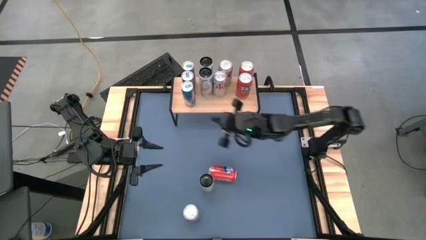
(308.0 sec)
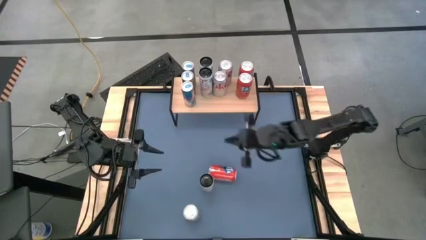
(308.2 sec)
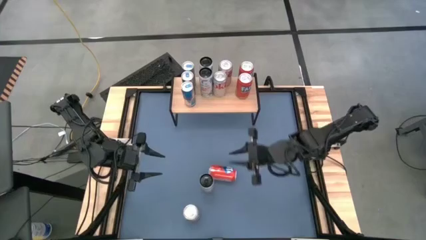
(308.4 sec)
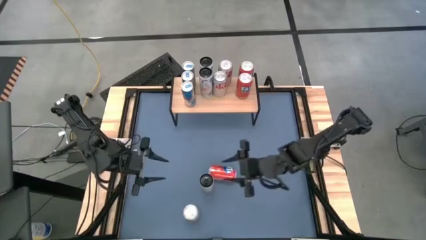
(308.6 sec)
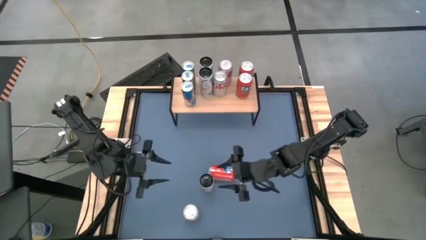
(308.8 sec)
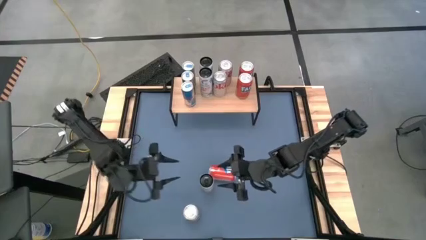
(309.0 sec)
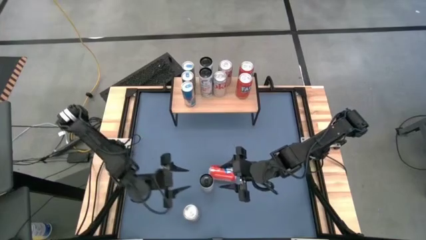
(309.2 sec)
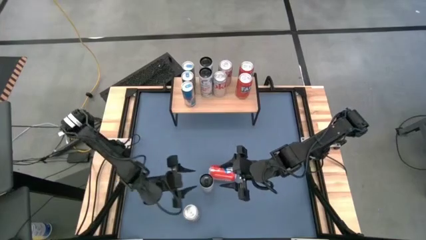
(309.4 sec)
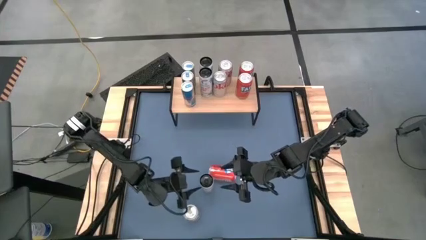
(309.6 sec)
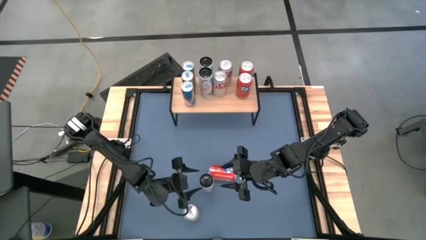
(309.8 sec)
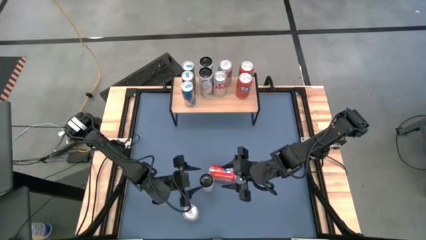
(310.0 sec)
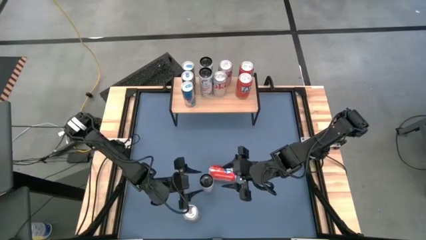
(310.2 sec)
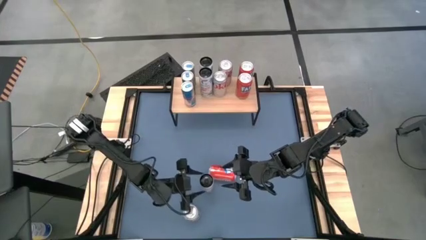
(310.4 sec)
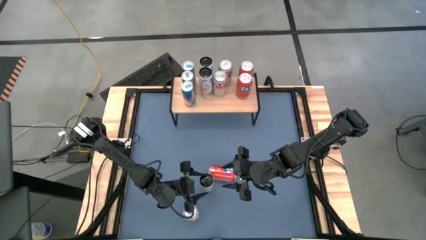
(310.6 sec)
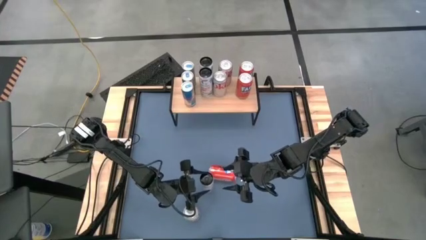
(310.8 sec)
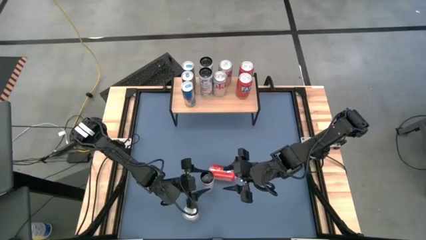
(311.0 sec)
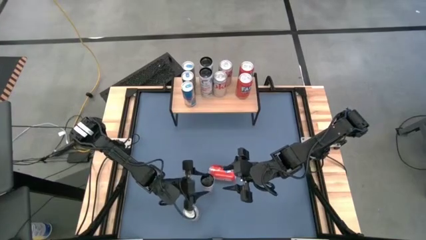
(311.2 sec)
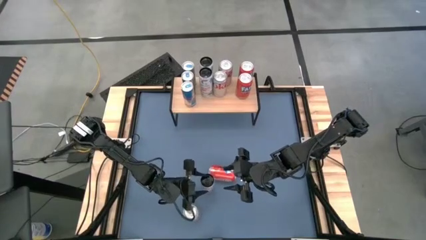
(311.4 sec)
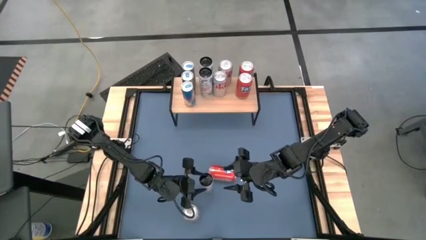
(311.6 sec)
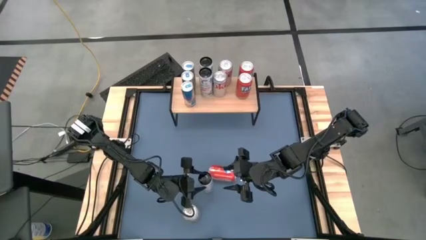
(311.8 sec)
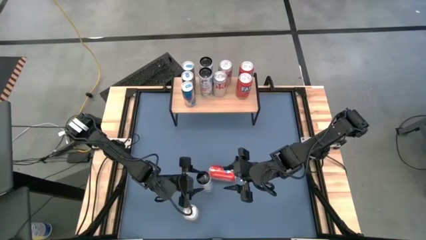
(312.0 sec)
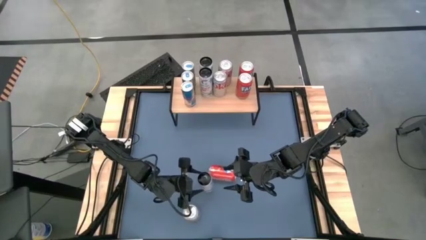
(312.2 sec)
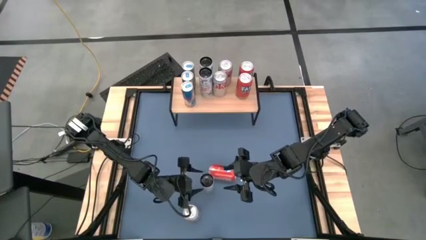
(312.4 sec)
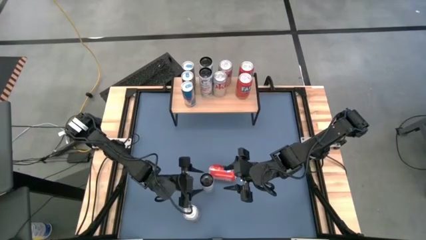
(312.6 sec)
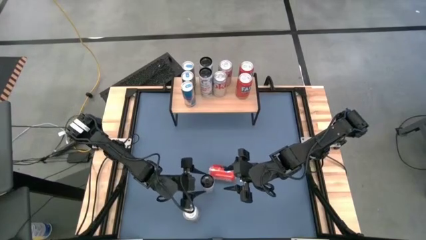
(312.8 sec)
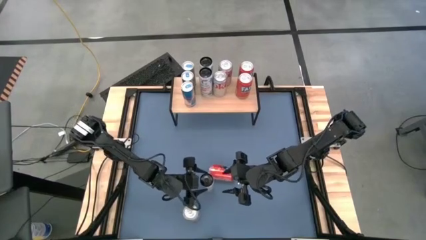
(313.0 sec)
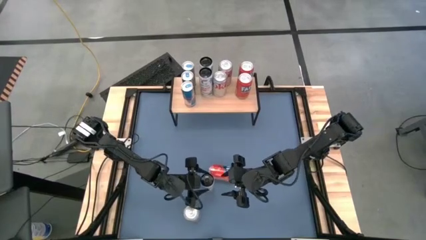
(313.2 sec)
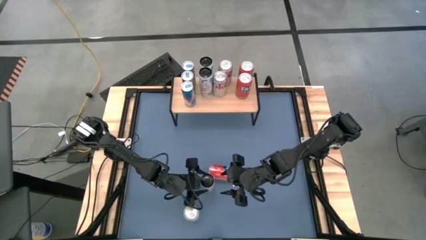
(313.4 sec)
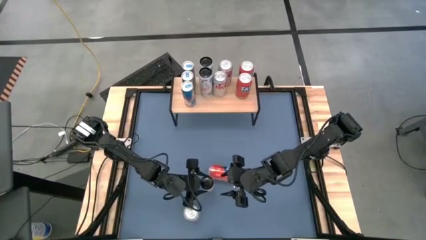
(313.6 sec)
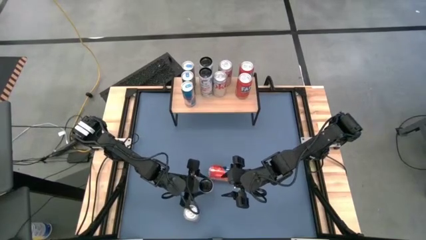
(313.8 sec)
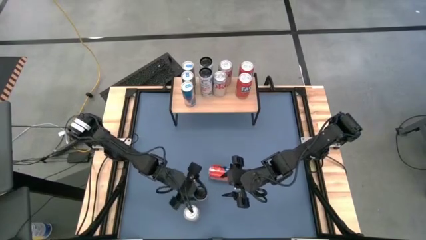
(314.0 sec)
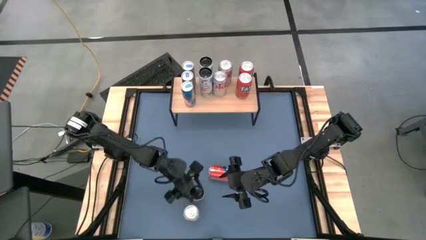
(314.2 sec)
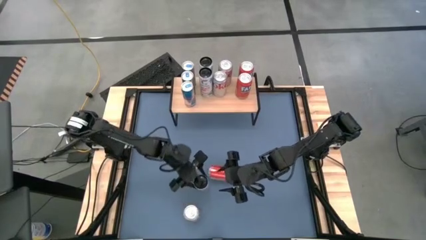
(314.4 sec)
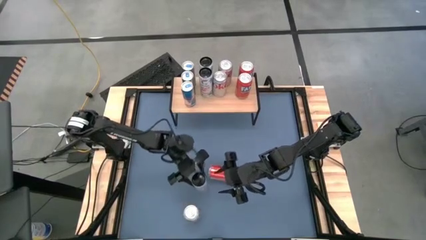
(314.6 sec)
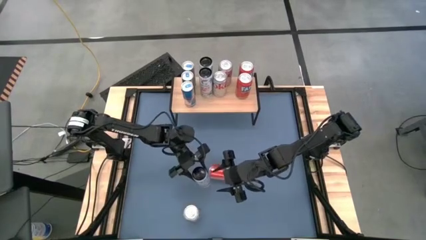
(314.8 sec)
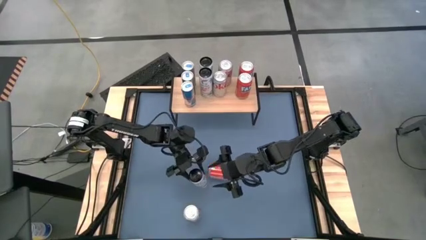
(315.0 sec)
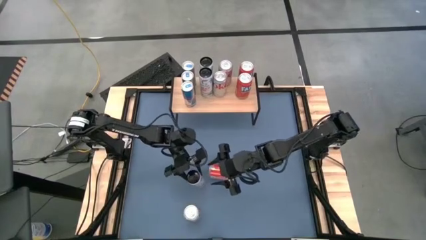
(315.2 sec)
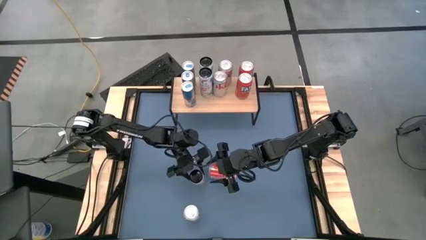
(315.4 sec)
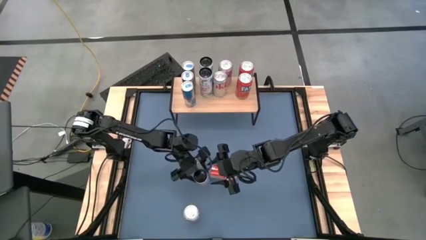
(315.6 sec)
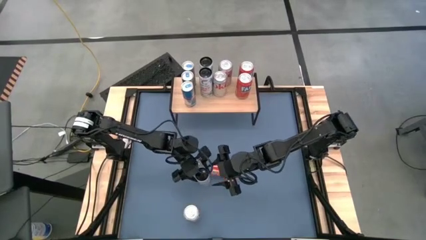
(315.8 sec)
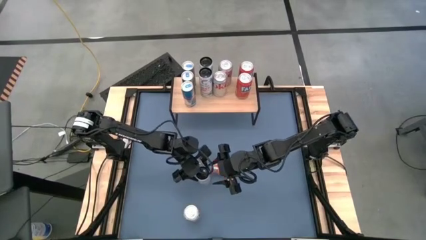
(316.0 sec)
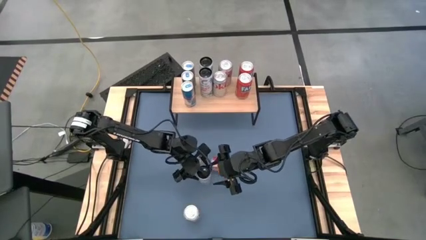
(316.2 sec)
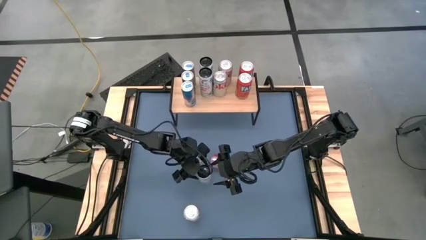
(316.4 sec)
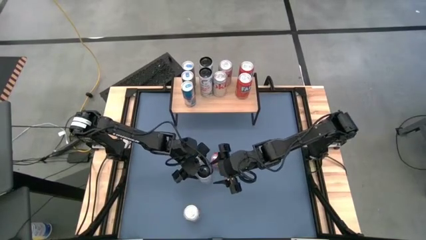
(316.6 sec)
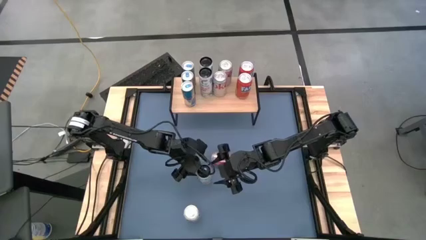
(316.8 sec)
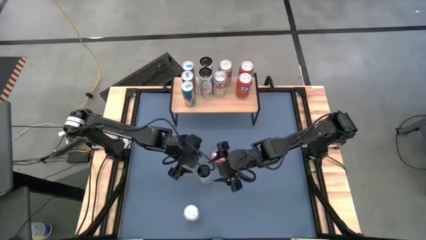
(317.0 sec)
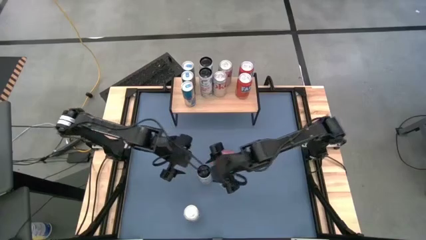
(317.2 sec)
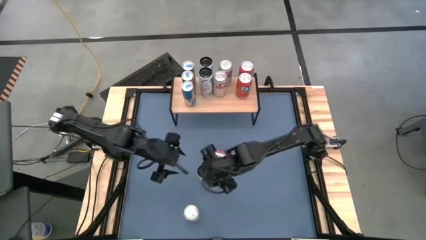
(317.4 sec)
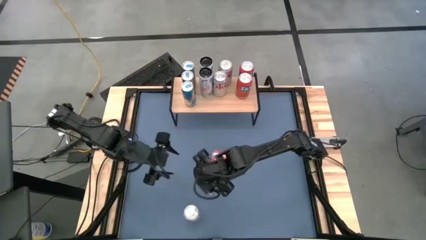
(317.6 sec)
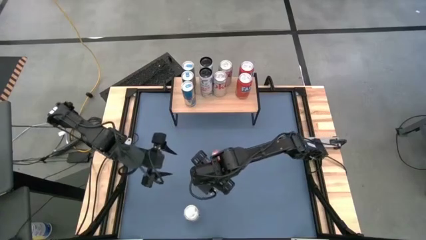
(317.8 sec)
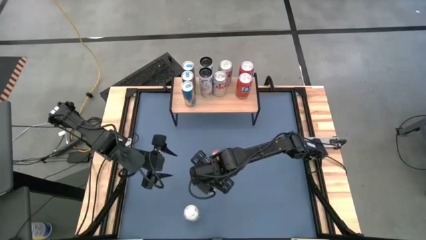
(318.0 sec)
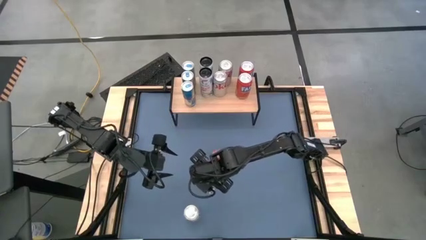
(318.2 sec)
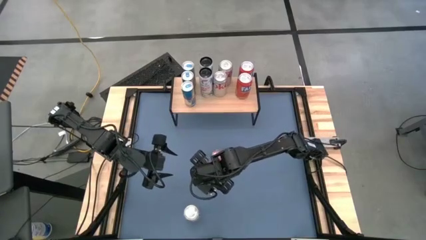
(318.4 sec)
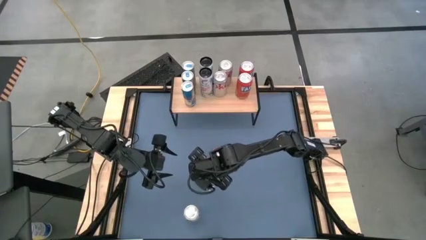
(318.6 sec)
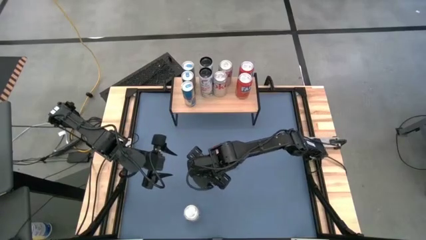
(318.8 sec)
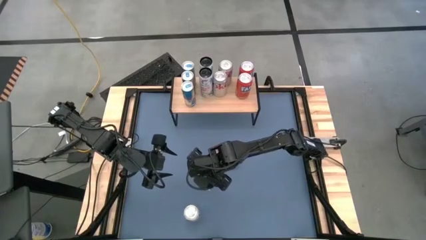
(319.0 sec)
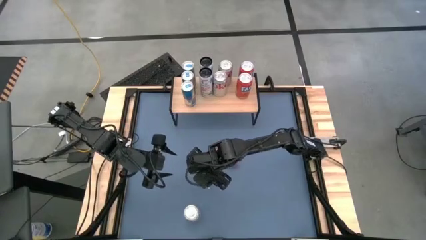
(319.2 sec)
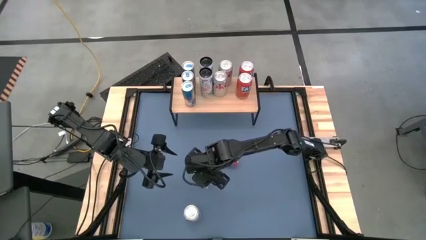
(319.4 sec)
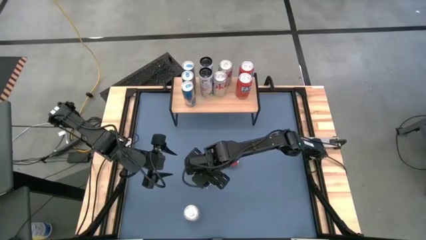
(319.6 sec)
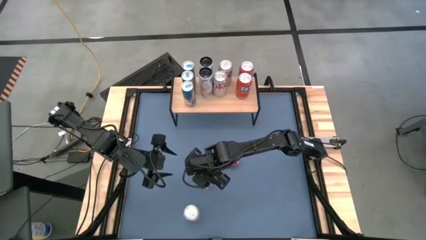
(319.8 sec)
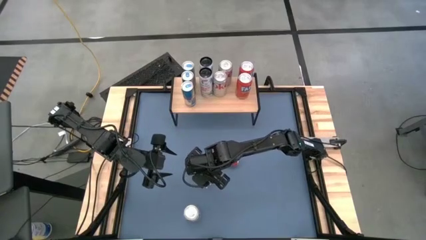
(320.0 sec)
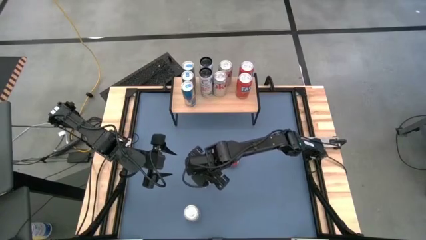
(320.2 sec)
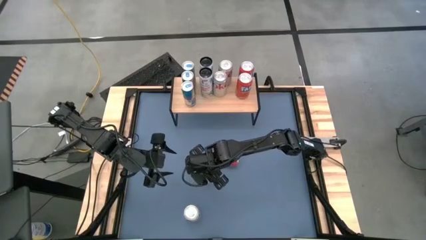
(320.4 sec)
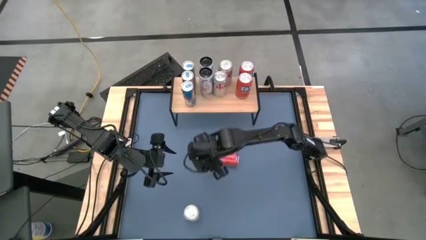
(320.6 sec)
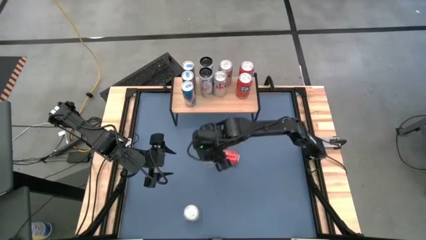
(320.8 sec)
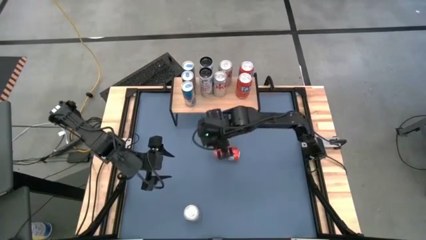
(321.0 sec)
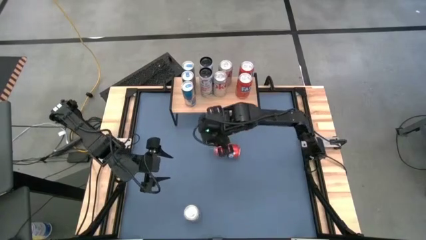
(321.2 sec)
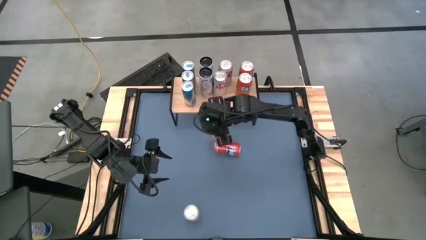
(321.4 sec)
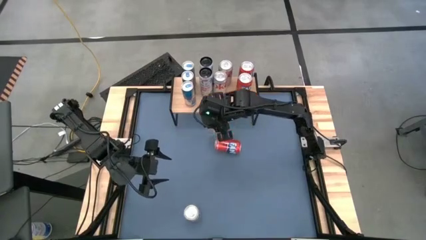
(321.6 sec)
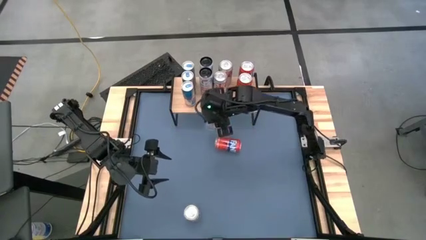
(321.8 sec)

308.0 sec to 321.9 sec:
Task: Place canned beverage on shelf
Put the pink soda can on the shelf aligned with the other pink soda can
